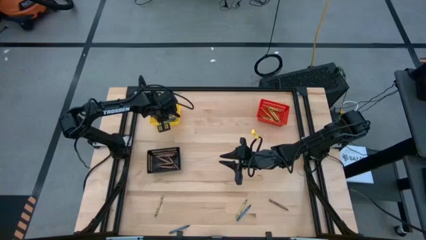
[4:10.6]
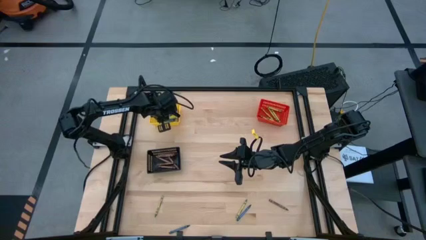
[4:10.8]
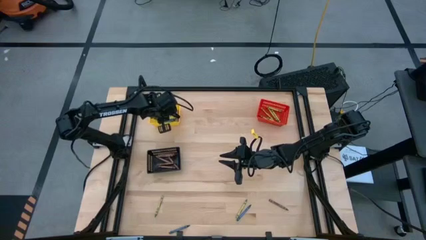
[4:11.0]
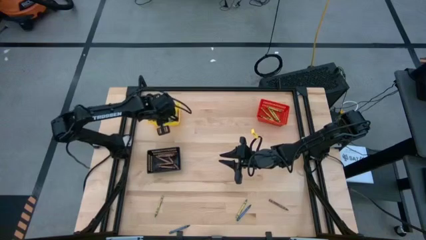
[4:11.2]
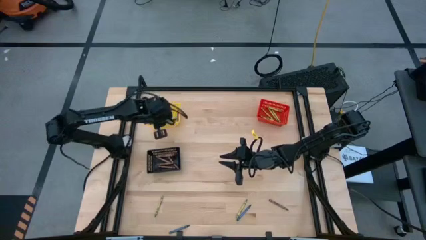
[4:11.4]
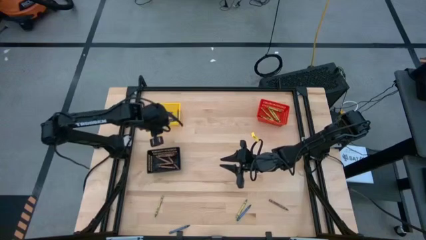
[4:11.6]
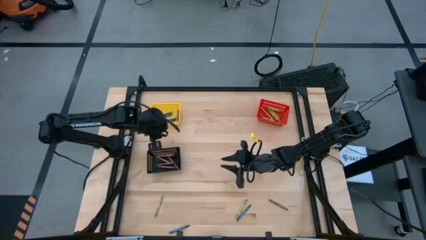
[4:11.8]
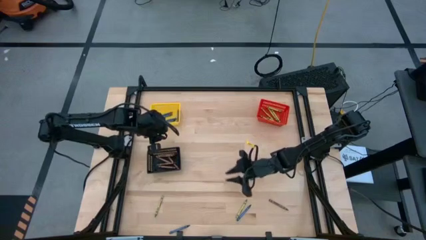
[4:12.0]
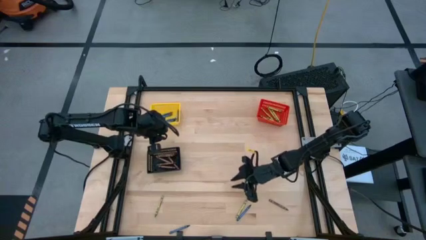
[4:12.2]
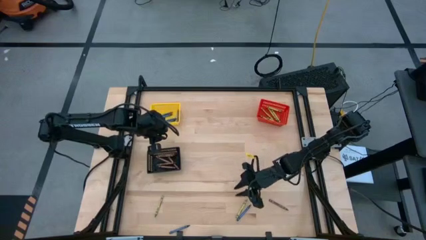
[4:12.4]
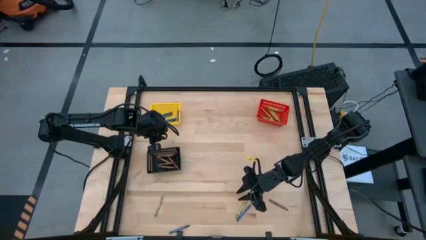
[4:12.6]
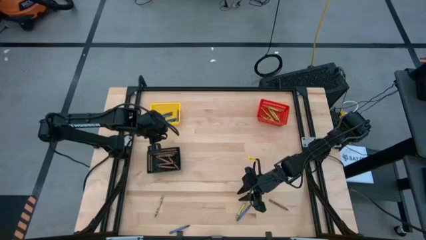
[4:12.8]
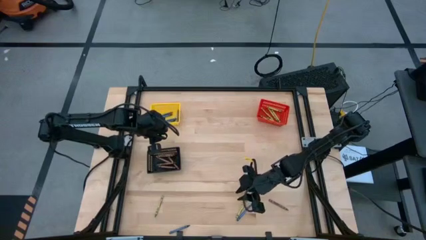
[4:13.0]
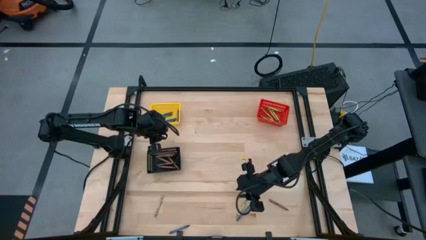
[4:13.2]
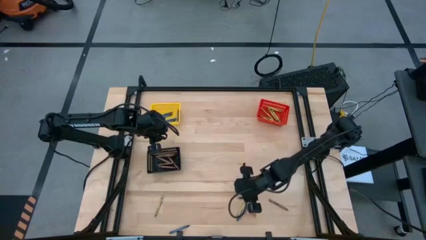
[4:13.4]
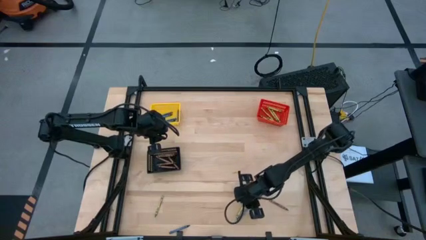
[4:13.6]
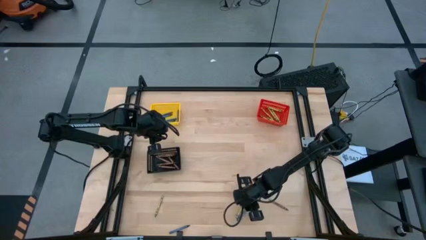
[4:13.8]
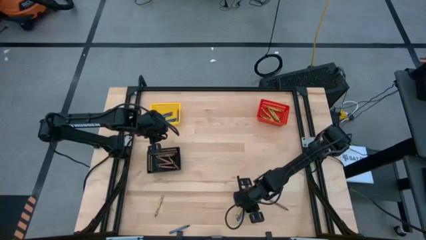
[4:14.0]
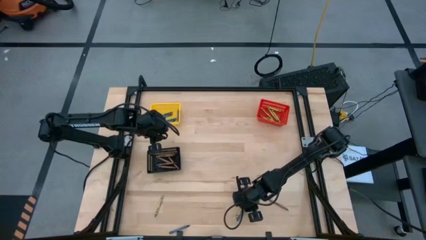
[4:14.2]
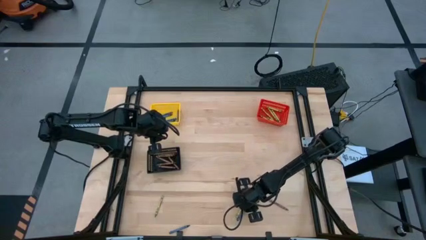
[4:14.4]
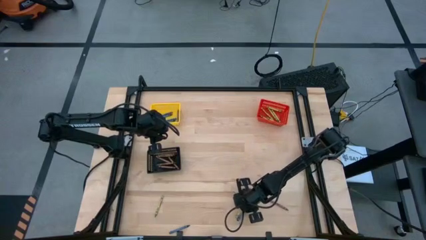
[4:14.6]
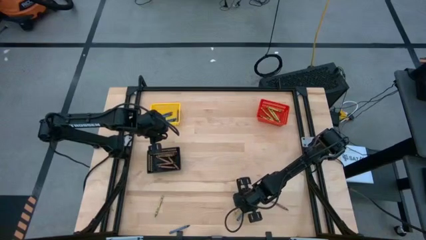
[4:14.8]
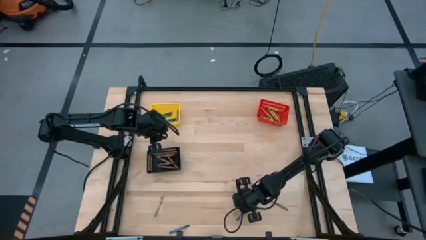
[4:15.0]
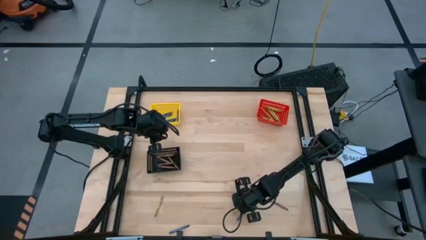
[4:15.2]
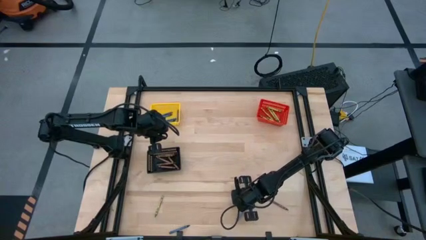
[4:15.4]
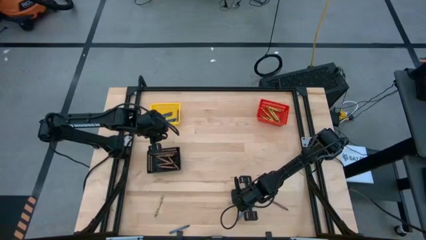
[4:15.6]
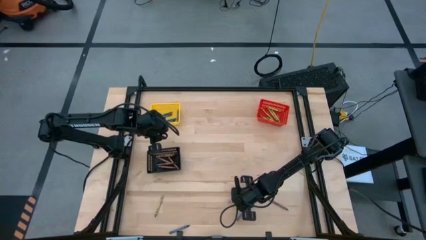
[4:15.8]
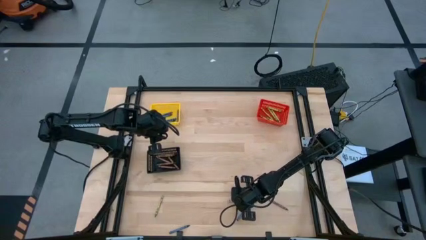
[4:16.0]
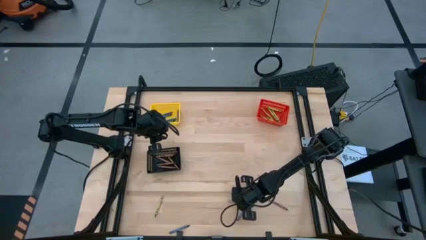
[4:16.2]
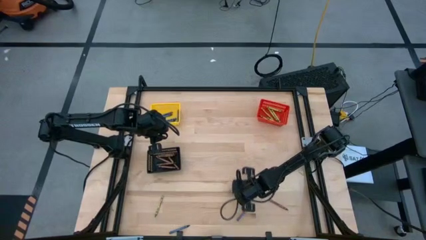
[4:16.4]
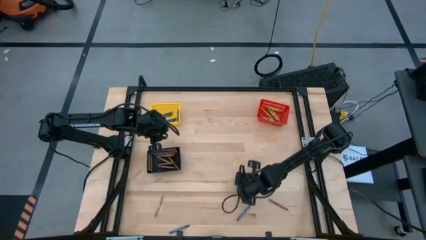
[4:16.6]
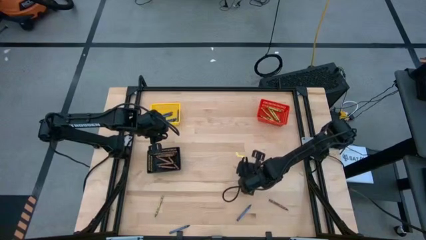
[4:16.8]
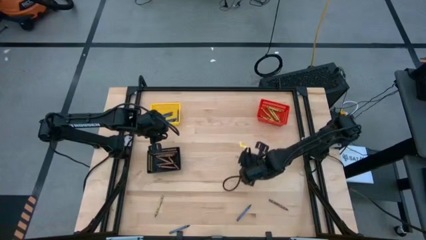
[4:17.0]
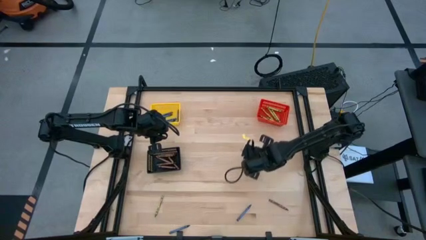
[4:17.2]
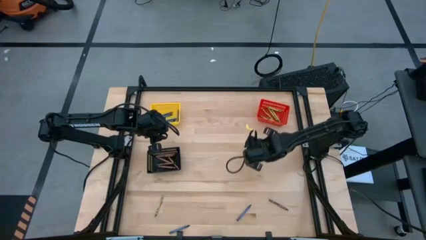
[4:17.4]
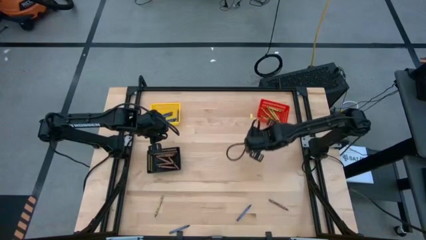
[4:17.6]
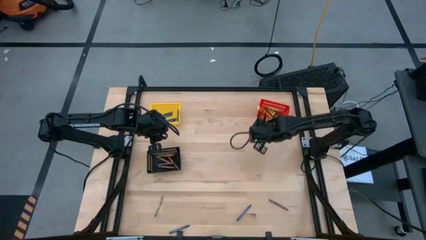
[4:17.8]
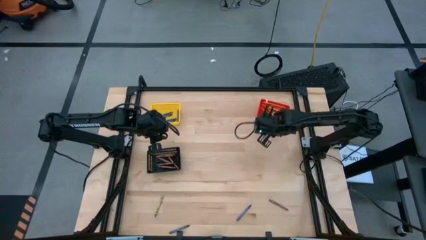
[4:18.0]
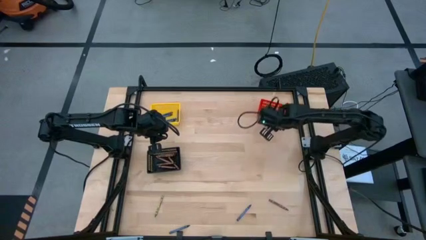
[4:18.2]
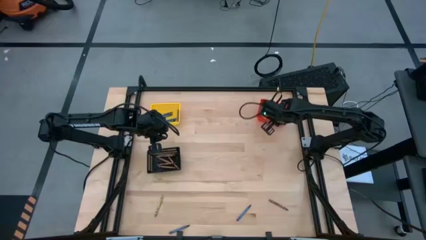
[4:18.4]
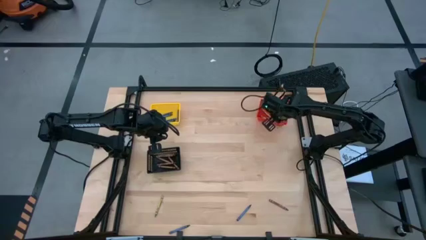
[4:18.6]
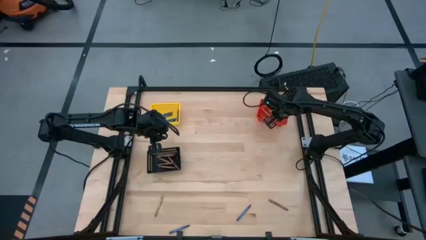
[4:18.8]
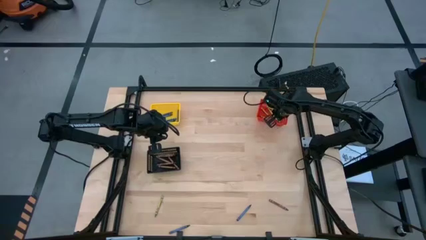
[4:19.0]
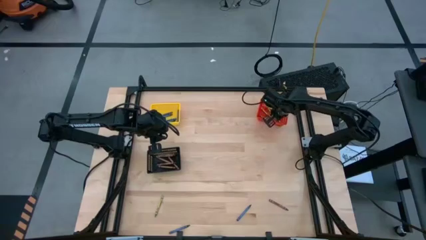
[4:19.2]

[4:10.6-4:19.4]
Task: Sort crayons
Put the green crayon into the red bin

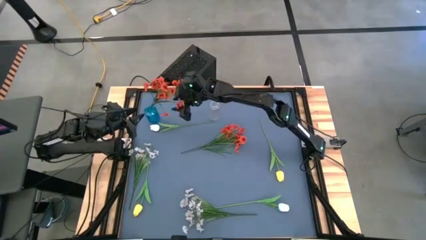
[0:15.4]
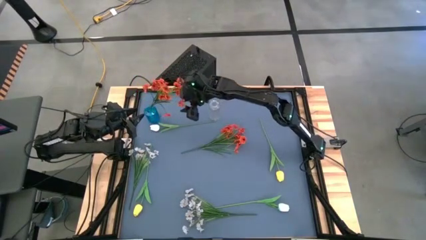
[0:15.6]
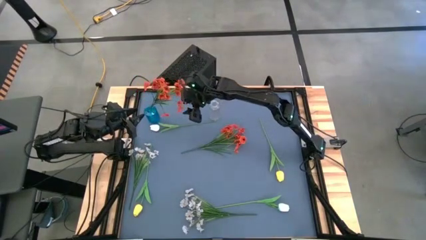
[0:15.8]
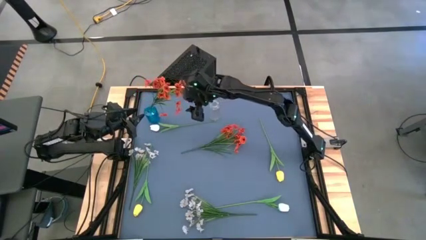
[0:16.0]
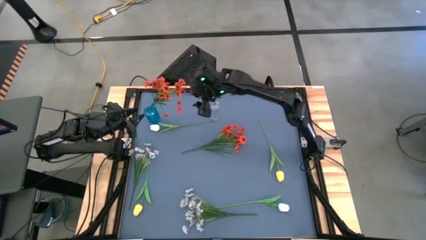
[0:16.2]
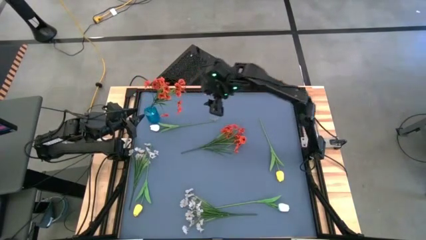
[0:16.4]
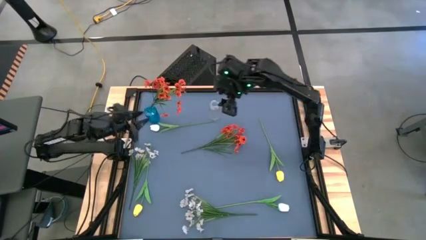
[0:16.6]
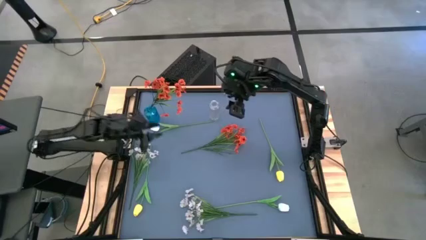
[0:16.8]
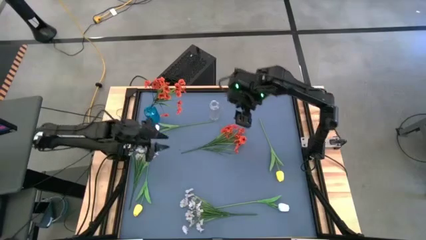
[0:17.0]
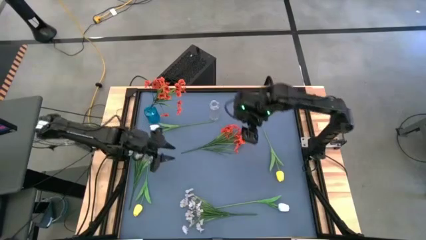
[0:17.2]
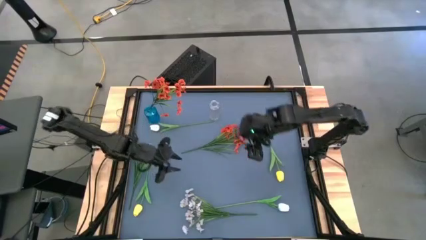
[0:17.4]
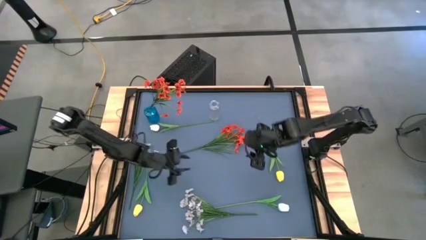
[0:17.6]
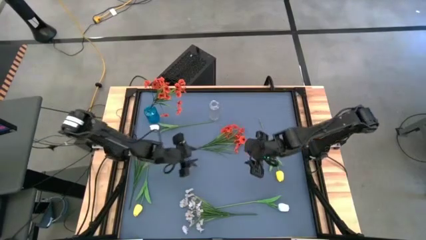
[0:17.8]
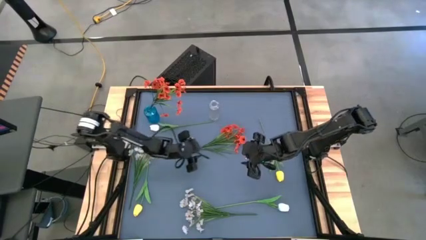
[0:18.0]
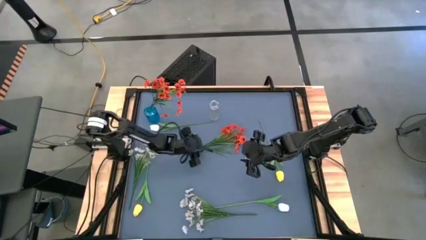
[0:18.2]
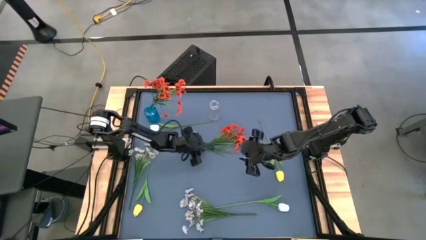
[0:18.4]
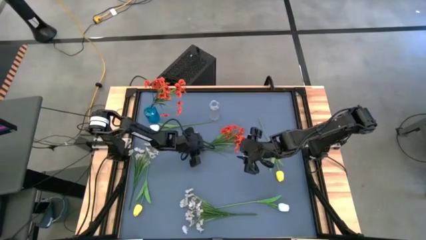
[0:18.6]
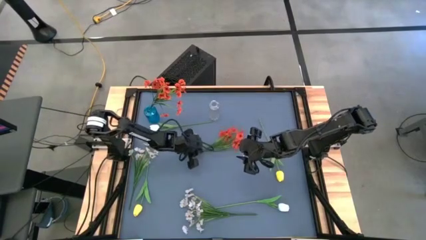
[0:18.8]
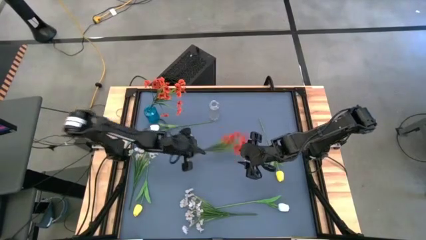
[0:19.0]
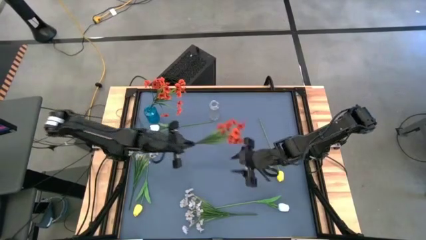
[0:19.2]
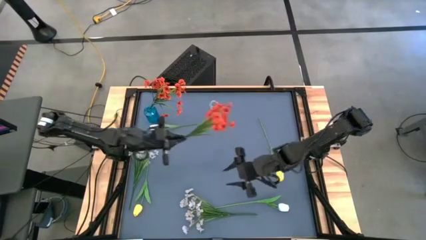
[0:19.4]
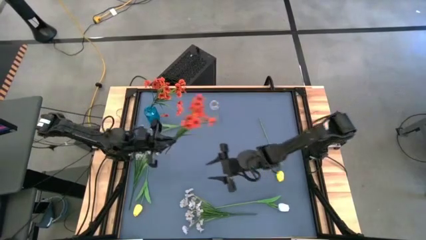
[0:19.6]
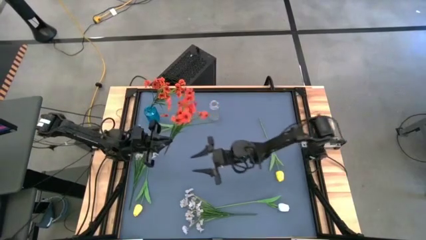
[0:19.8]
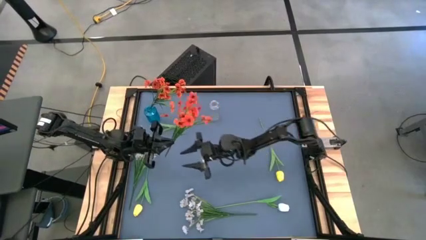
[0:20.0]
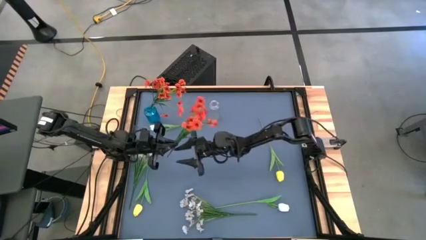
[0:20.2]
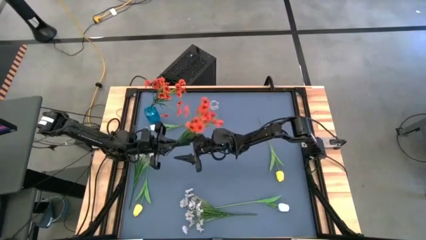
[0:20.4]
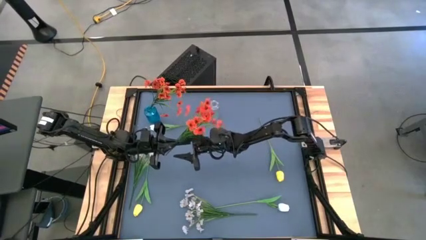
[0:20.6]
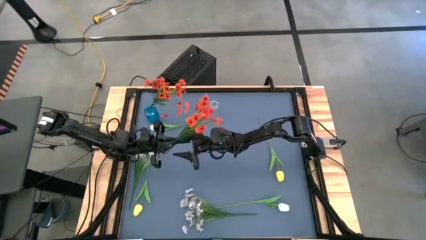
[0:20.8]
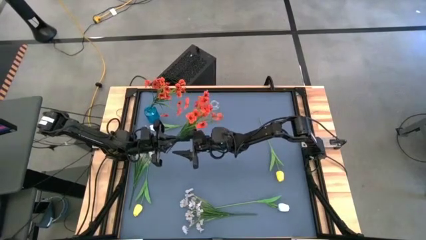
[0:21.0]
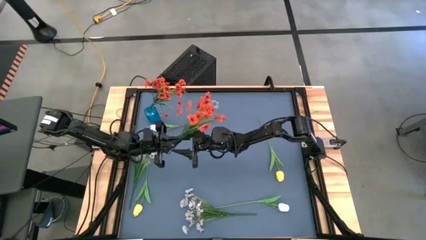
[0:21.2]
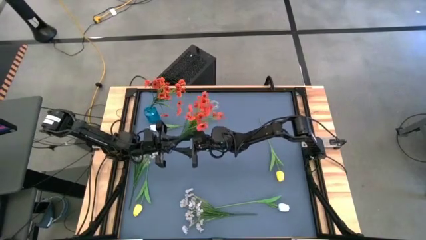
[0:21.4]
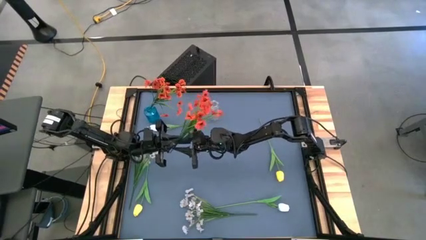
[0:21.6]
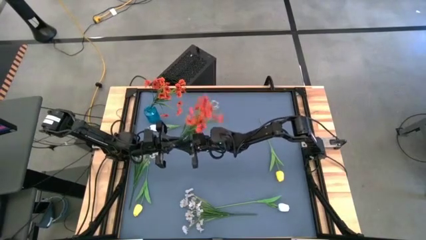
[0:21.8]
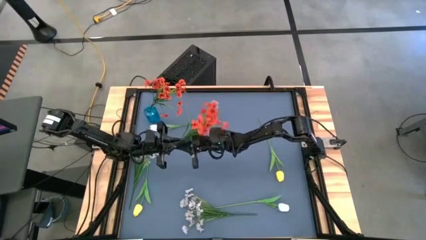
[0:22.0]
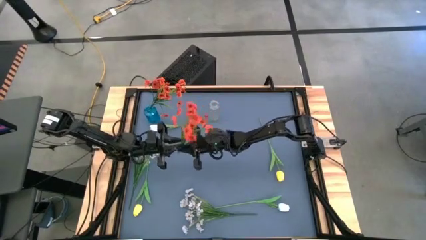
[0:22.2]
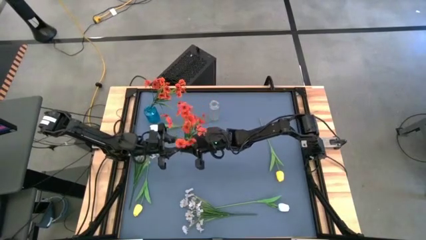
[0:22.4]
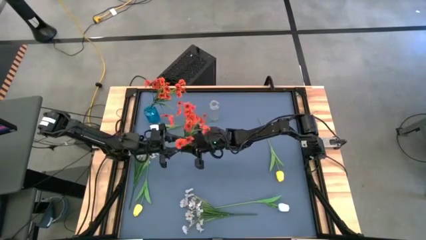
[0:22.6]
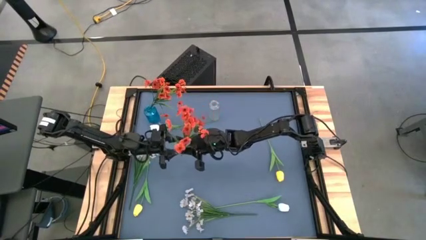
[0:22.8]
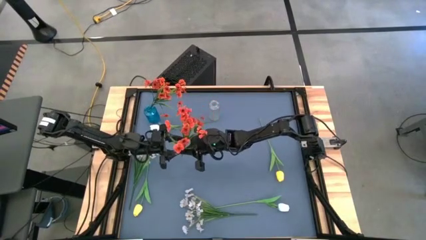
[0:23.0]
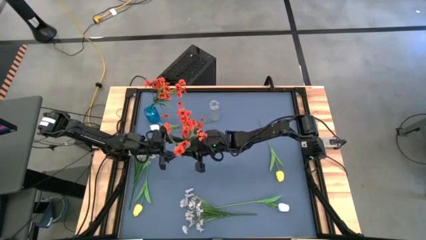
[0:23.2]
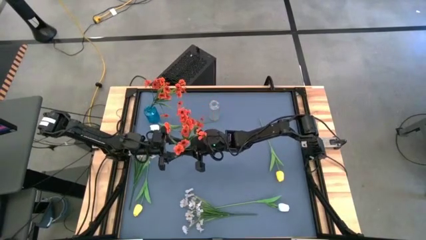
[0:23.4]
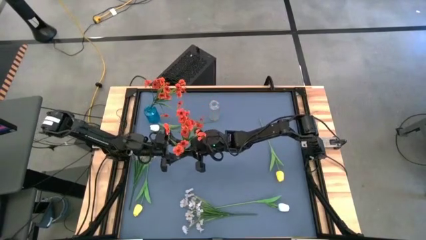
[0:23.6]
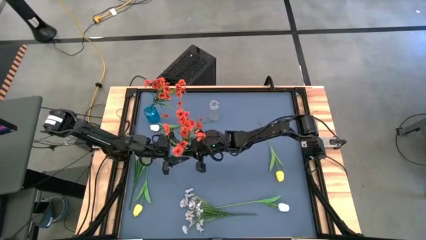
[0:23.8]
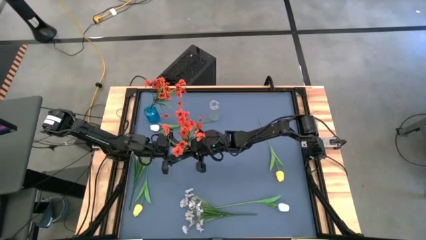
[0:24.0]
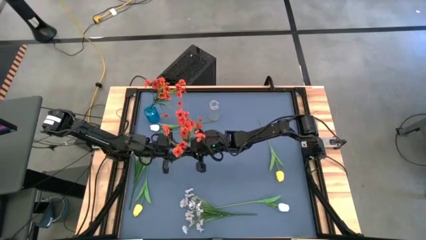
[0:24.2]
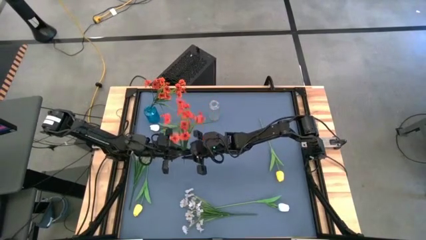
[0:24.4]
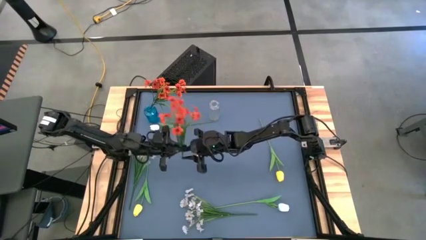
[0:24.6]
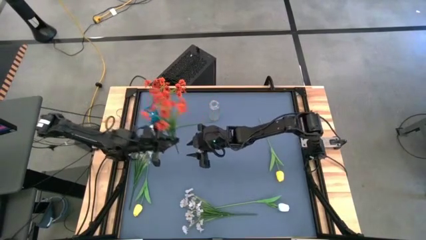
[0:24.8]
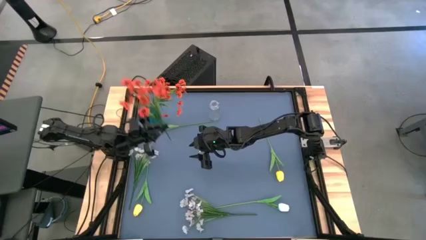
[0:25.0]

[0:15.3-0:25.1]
Task: Sort flowers into vase by color
Put the orange flowers into the blue vase
